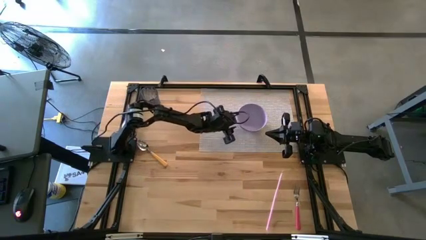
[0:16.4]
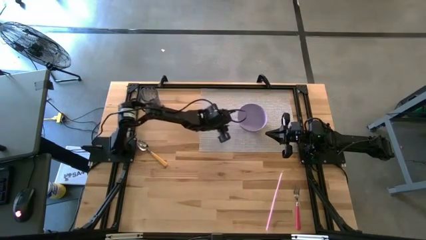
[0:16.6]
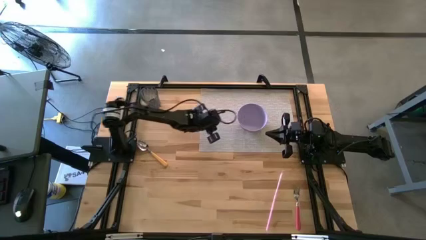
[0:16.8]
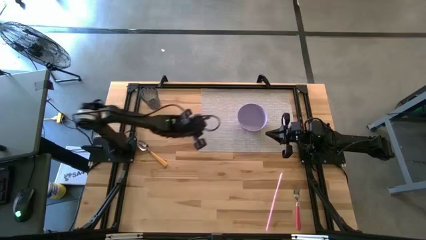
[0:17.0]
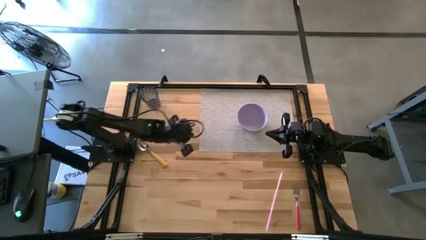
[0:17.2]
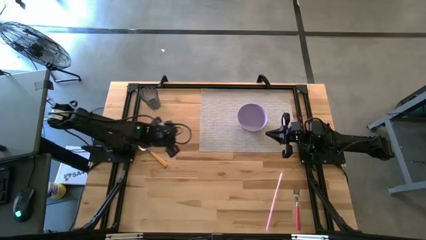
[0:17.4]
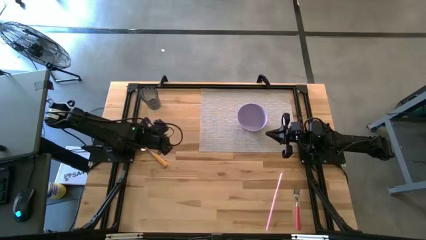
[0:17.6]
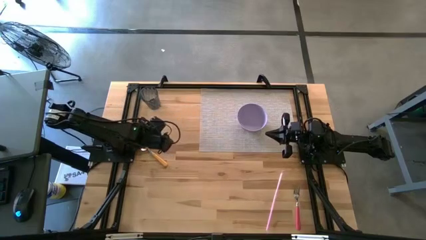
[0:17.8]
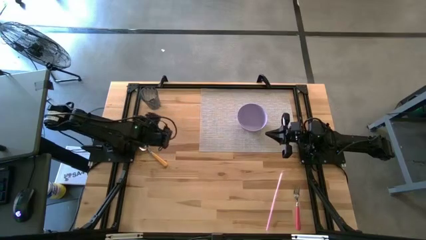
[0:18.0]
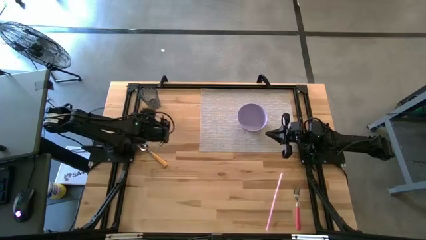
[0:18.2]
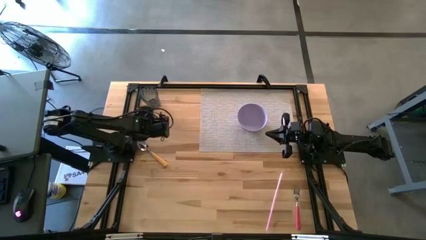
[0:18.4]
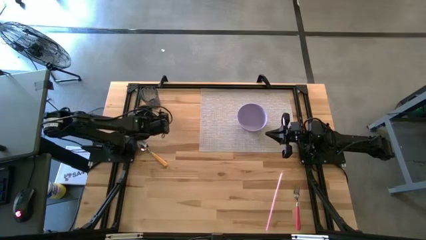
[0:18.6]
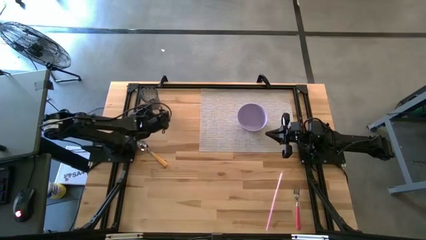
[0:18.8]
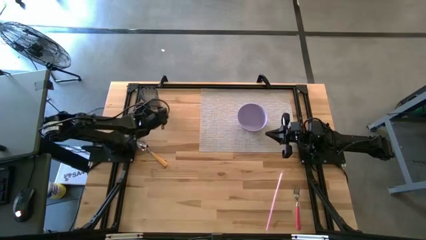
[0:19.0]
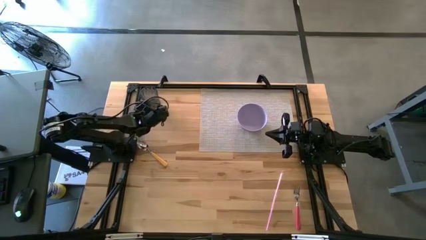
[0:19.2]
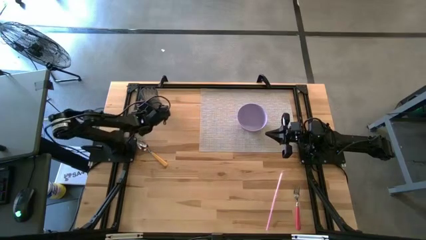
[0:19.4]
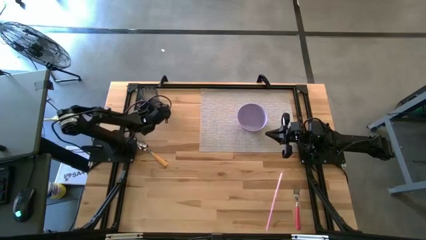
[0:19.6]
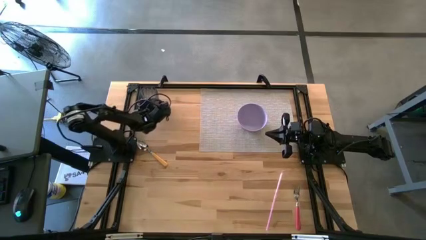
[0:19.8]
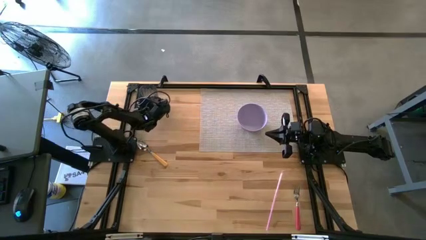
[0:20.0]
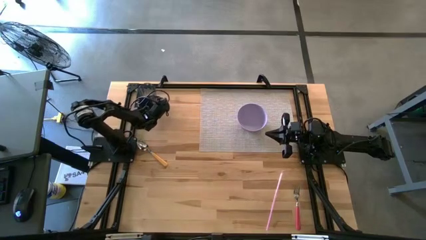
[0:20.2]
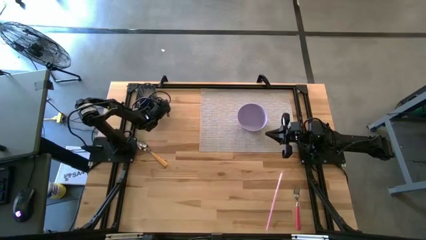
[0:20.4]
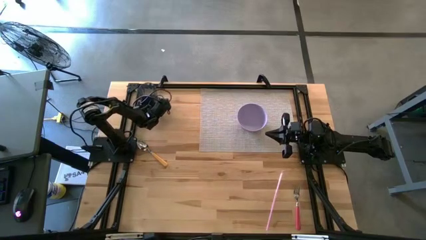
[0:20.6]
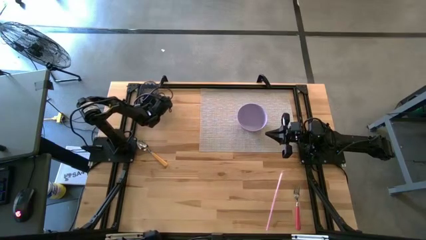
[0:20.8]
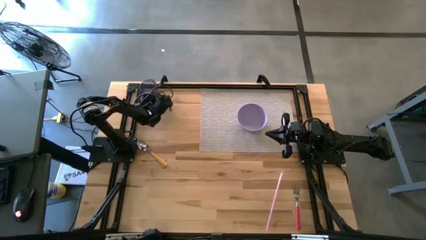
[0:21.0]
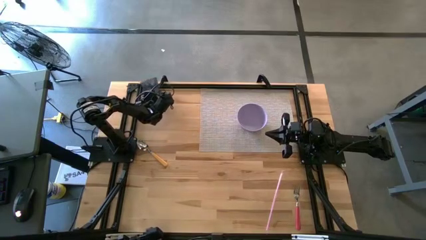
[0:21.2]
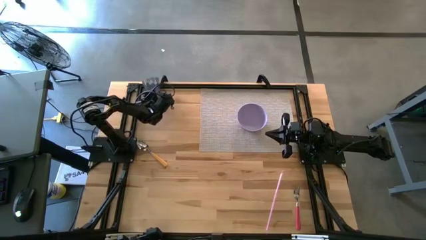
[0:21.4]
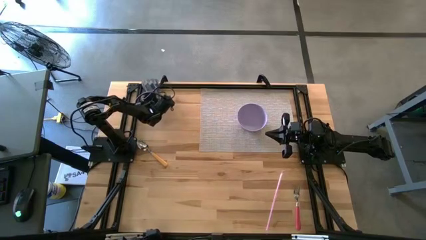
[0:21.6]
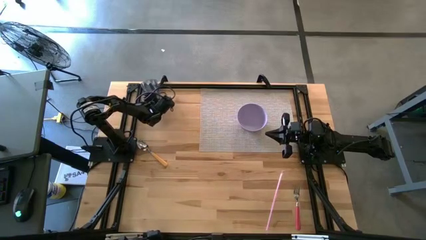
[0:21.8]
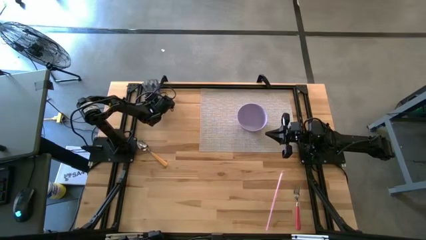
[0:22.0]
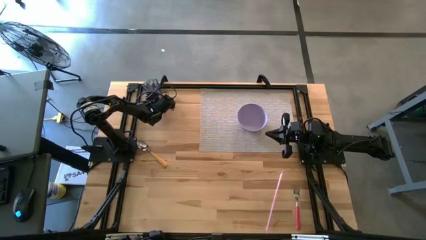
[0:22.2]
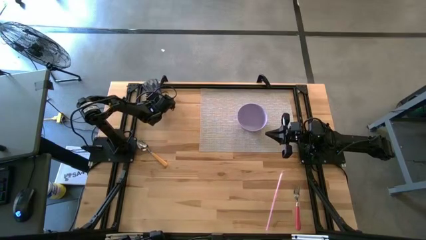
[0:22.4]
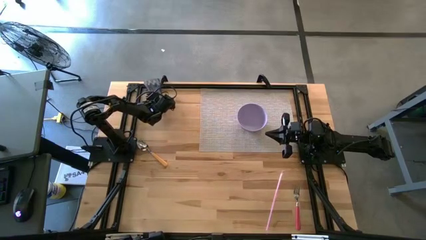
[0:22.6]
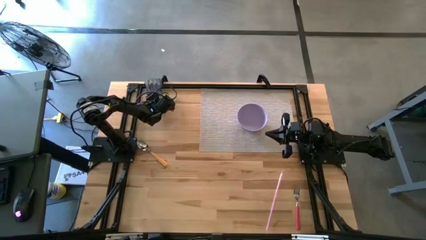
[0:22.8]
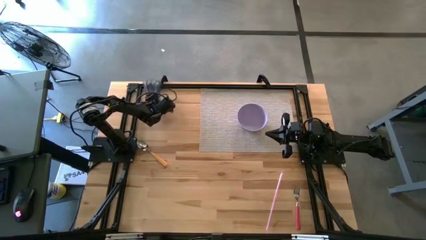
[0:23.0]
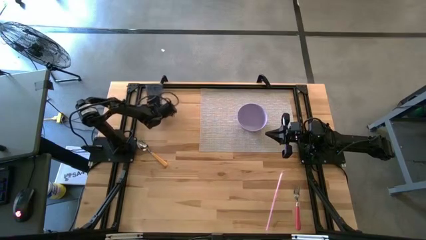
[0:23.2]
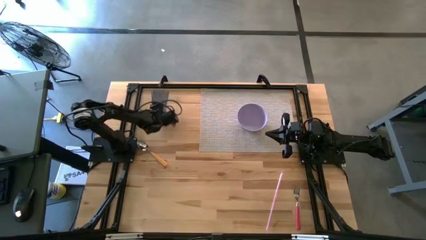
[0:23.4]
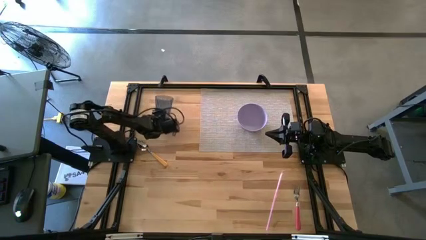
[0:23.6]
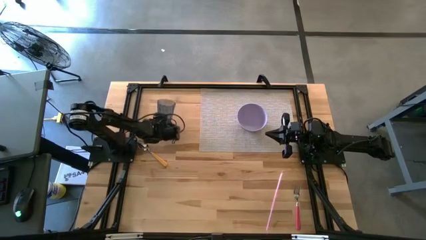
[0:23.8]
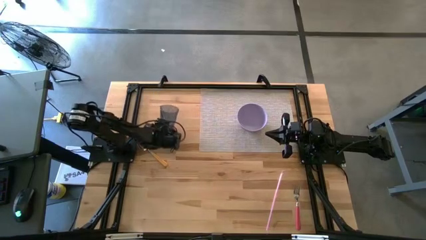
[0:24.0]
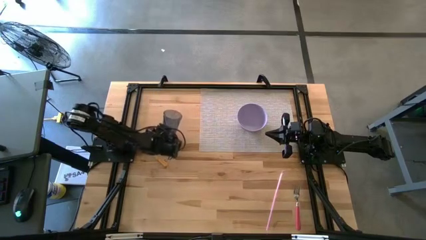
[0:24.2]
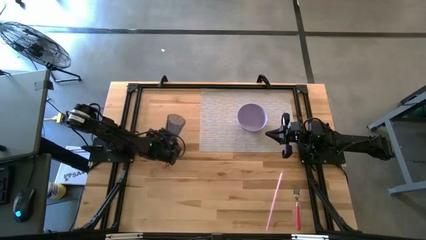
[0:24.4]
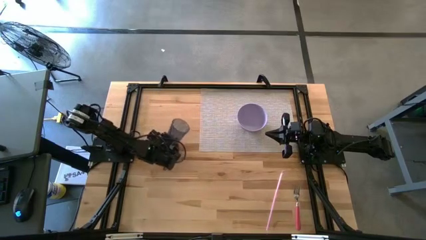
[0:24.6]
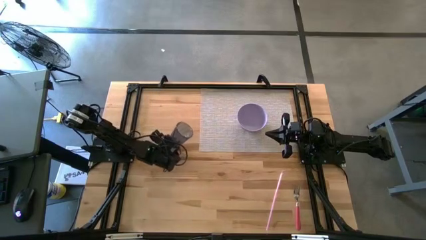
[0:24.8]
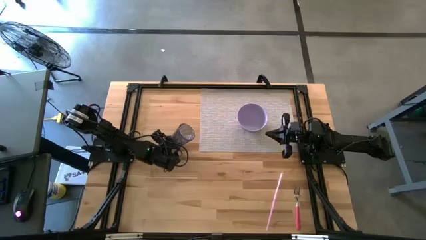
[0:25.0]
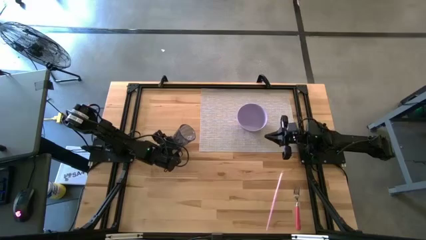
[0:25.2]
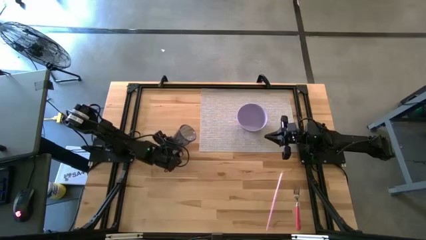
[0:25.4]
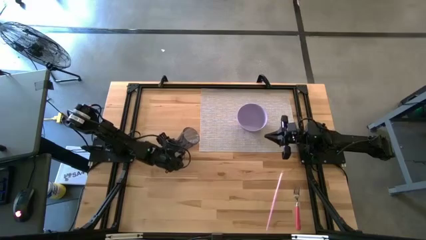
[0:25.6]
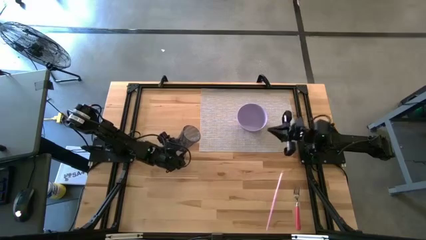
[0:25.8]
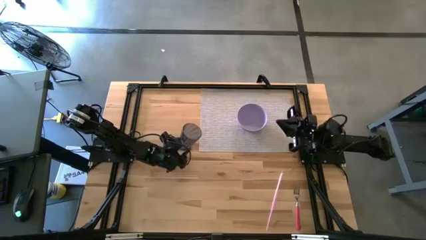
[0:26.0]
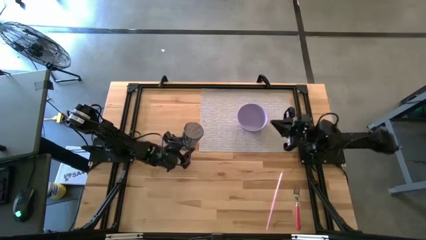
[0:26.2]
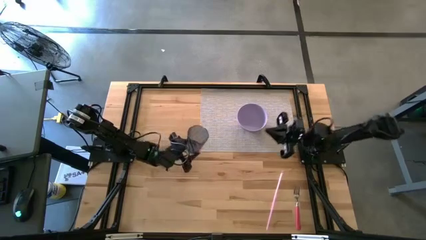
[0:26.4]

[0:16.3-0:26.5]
Task: Pick & Place Utensil
Put the black cup on the gray table mat to the top right of the purple bowl
